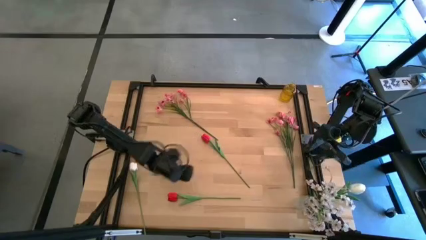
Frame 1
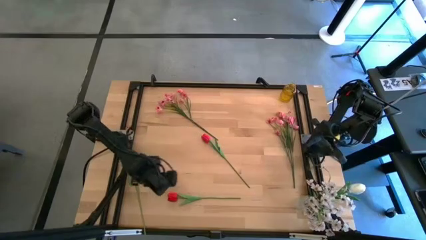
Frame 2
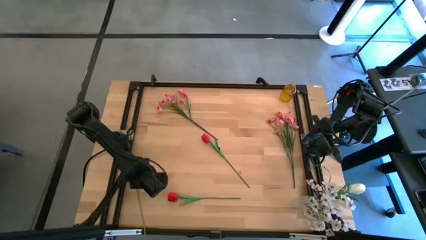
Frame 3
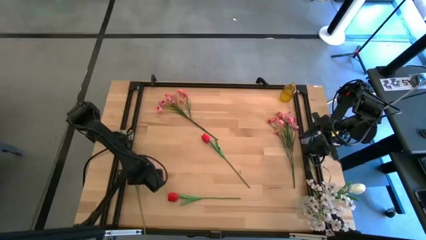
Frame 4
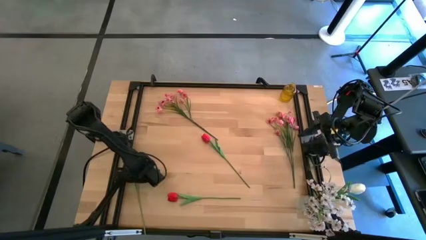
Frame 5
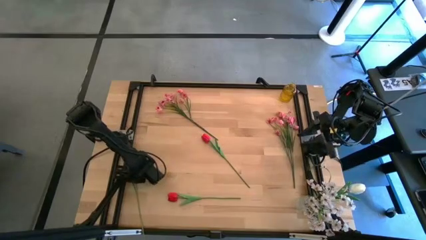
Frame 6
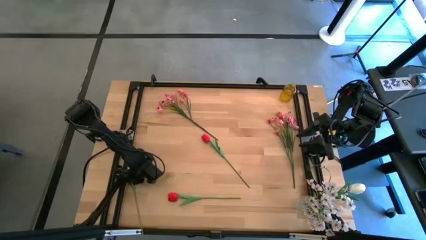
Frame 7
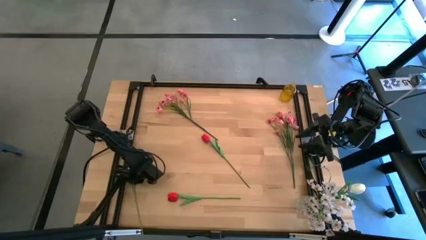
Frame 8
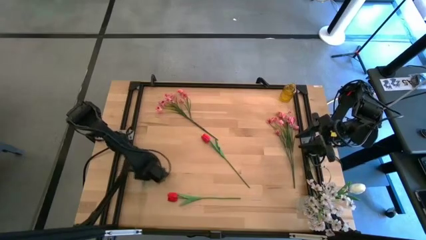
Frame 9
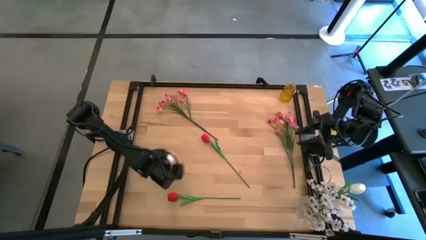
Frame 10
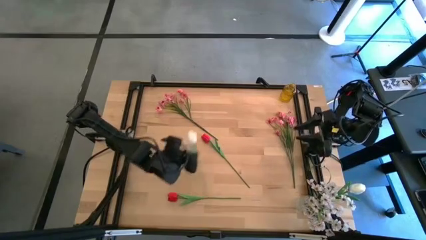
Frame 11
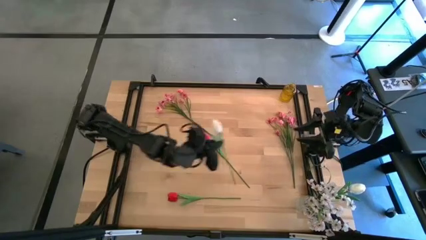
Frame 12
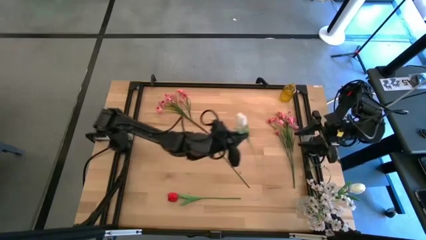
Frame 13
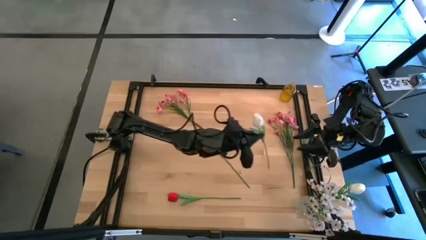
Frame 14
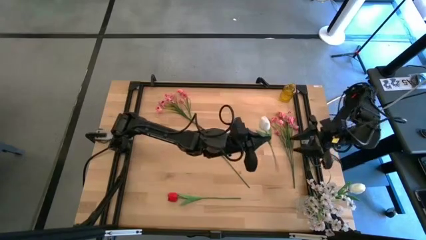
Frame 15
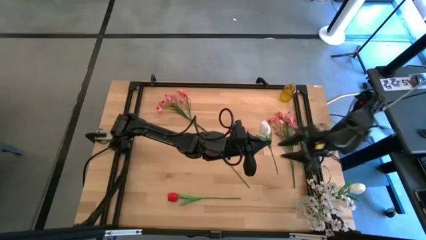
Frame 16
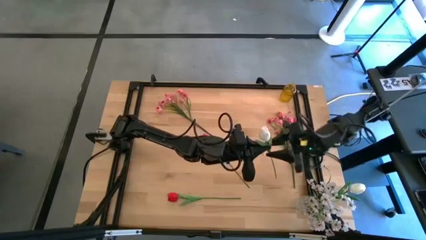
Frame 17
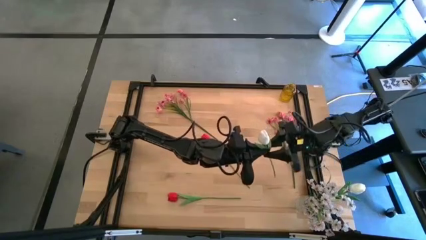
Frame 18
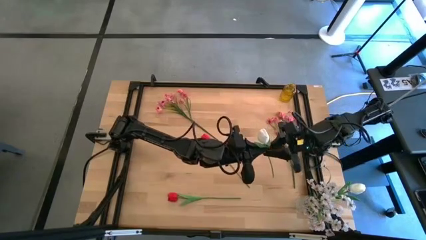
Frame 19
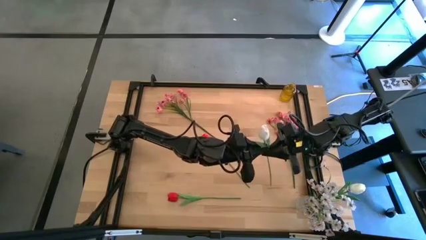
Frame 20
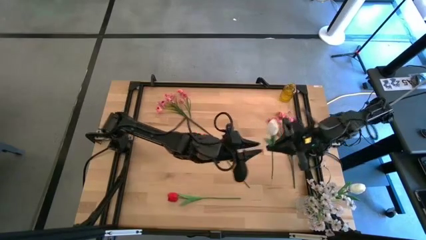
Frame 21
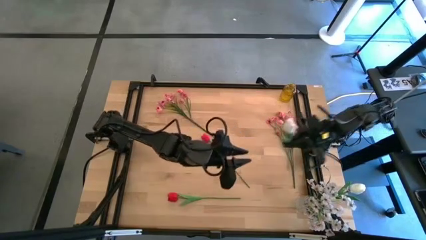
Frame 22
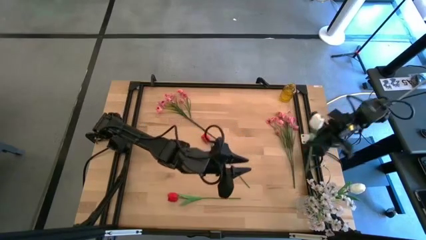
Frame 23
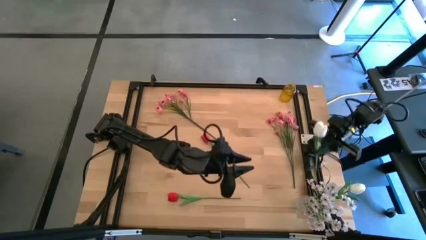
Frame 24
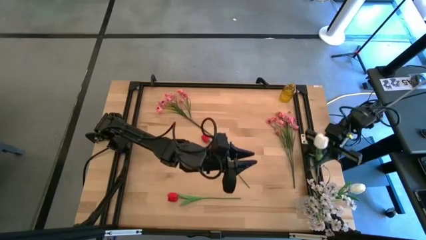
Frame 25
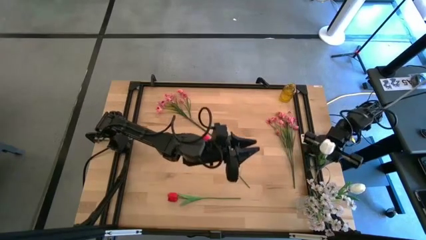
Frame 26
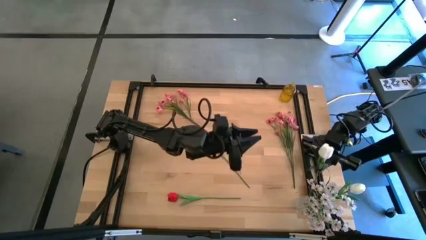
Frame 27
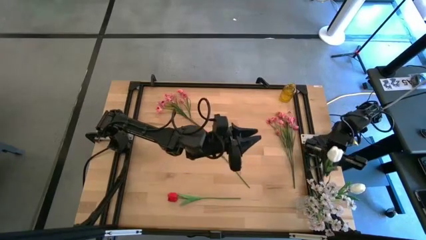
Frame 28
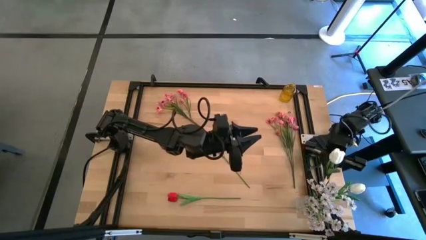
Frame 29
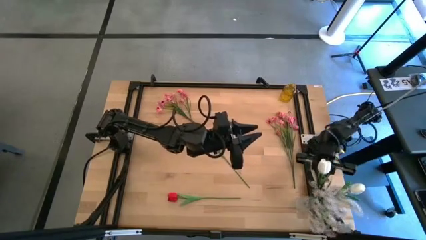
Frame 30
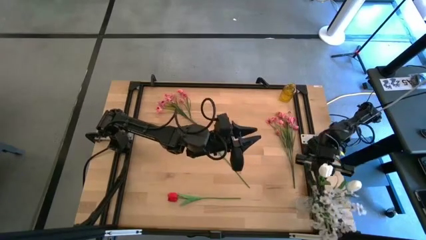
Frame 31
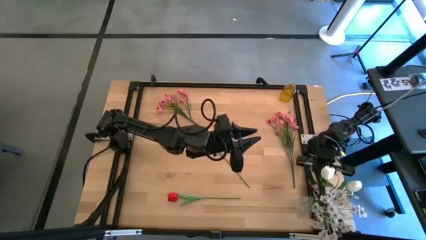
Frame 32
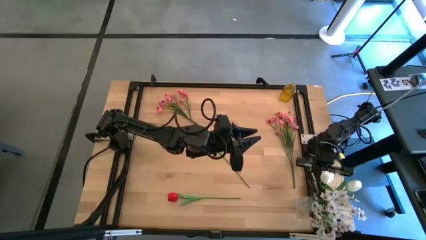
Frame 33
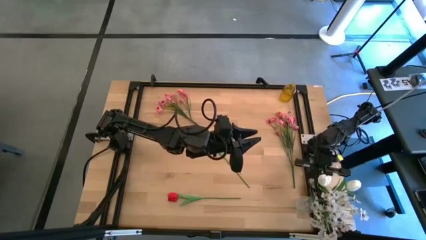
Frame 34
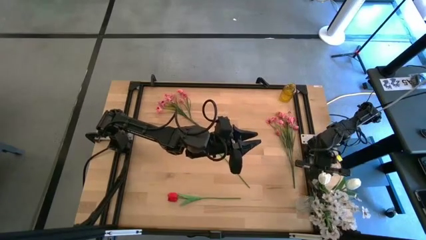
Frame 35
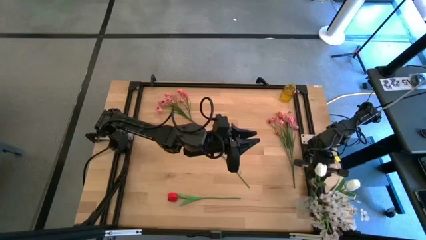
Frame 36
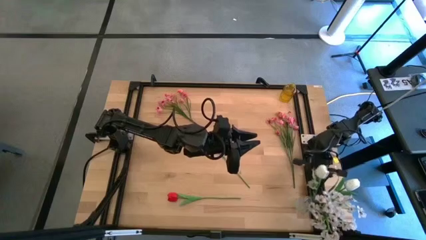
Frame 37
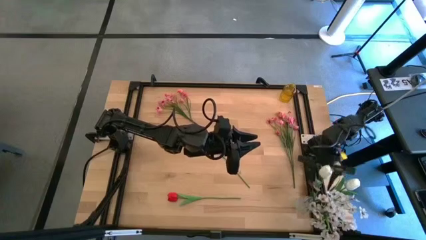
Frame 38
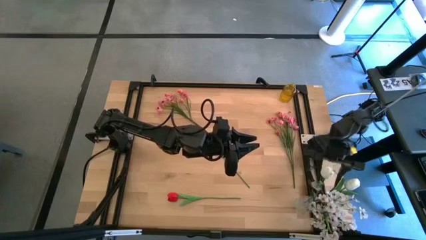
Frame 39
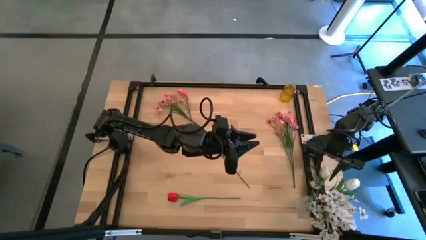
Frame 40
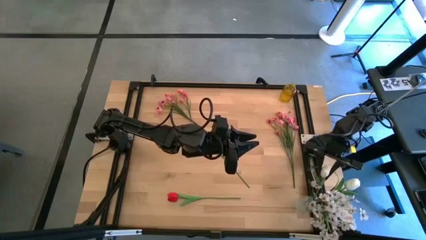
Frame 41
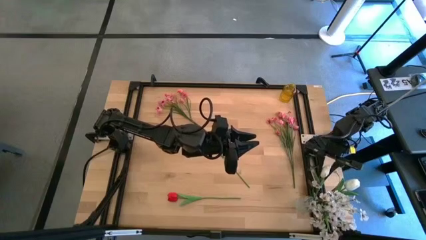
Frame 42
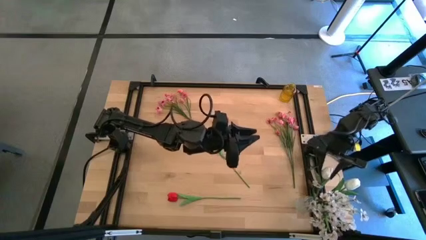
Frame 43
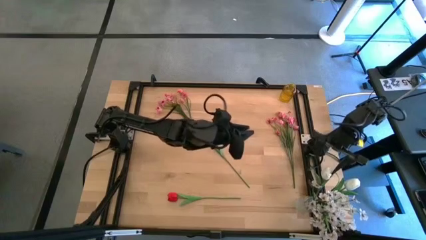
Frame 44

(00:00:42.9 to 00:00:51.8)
Task: Sort flowers into vase by color
Put the white flower into the transparent vase

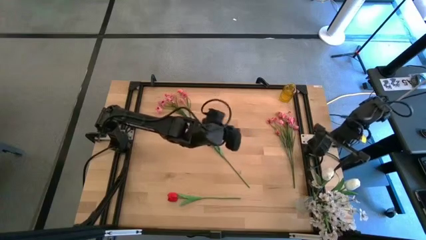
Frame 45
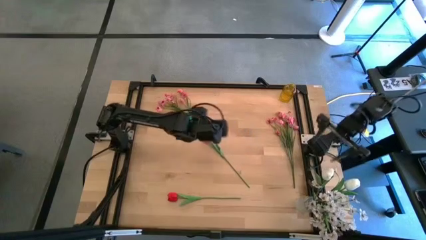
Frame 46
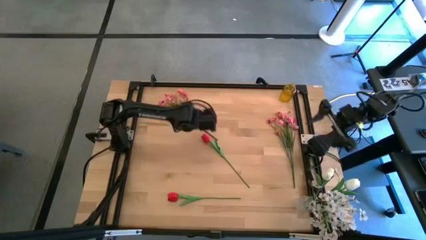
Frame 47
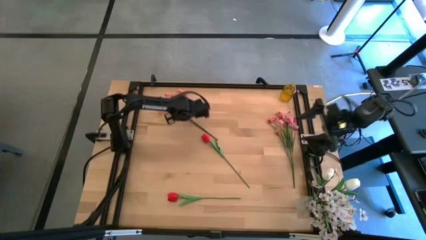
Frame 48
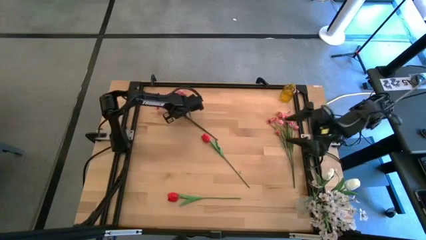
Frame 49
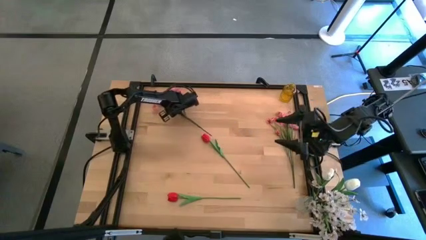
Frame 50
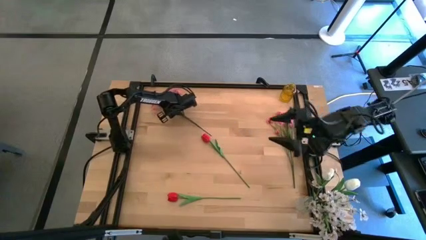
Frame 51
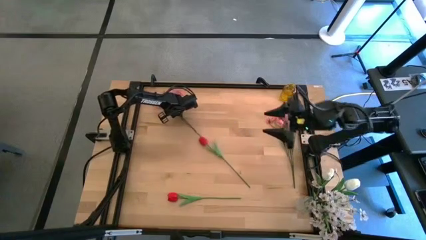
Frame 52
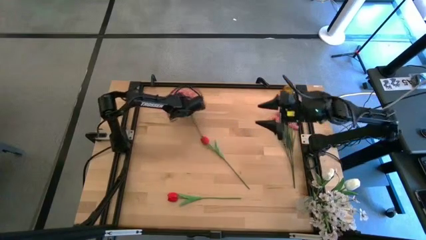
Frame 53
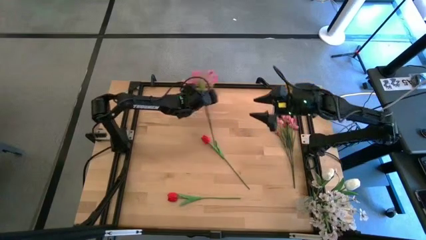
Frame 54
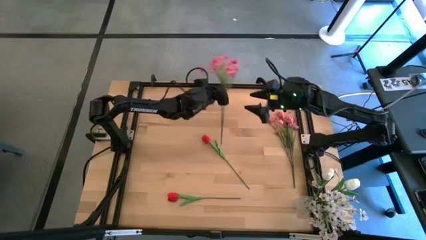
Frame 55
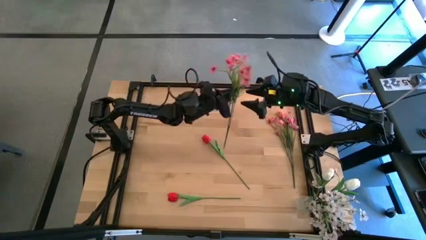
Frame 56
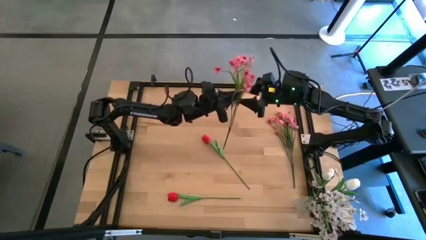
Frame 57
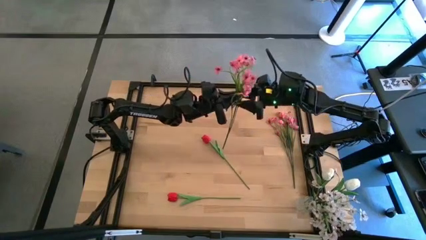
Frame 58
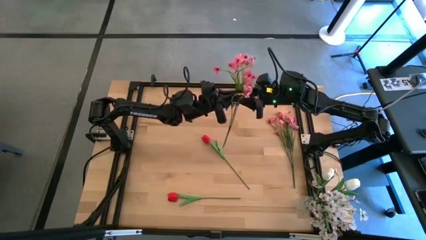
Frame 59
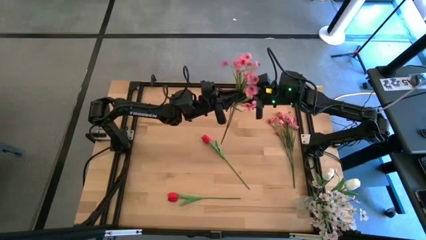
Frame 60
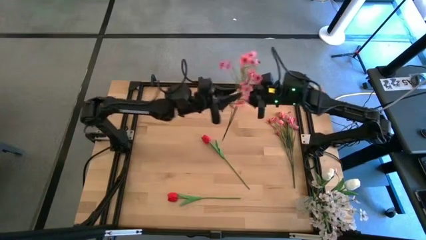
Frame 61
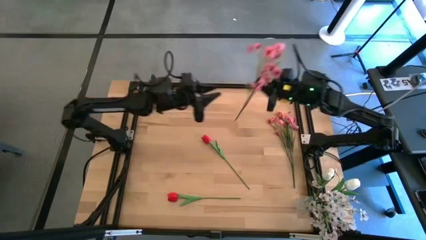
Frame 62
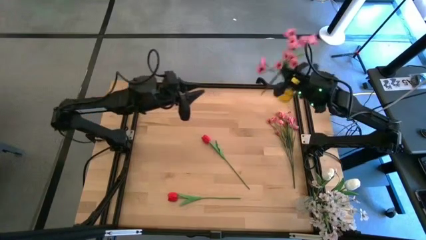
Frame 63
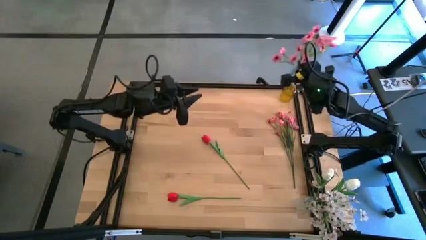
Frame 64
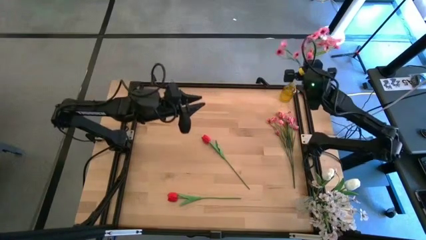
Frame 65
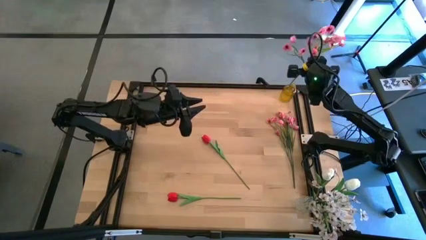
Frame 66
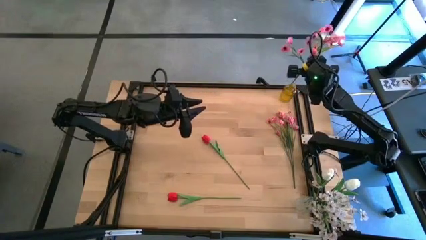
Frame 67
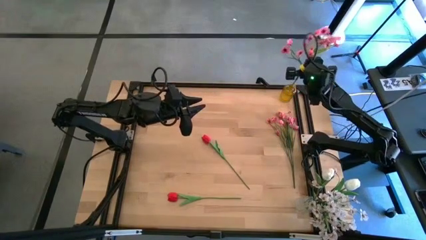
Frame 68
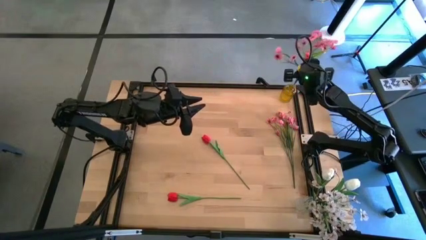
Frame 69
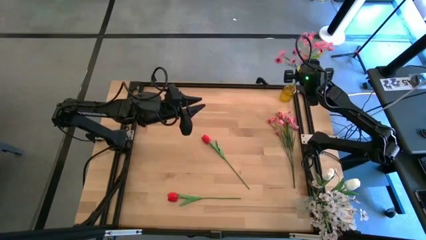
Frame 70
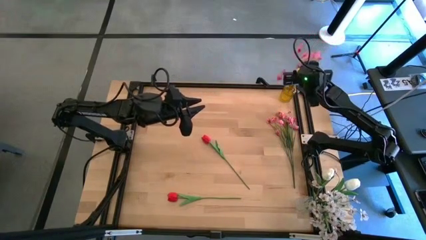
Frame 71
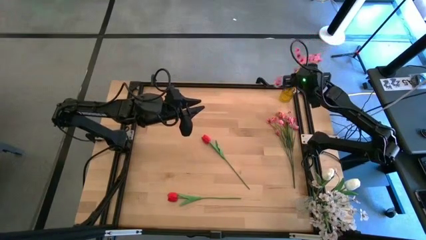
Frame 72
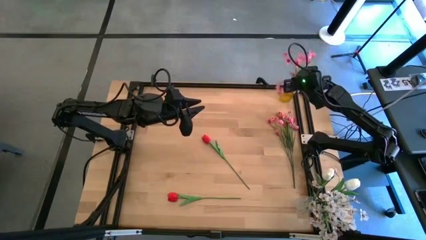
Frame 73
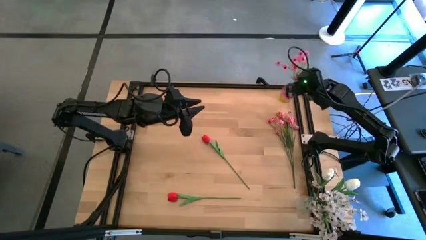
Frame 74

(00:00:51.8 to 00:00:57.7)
Put the left pink flowers into the yellow vase
